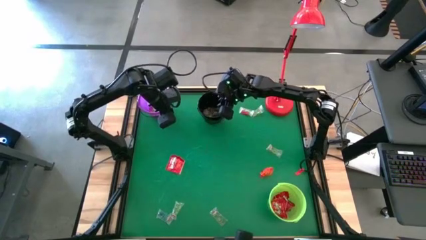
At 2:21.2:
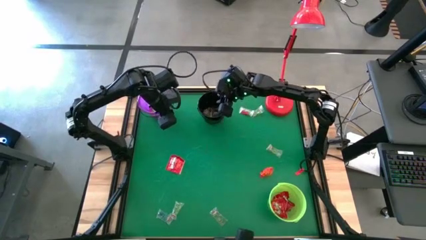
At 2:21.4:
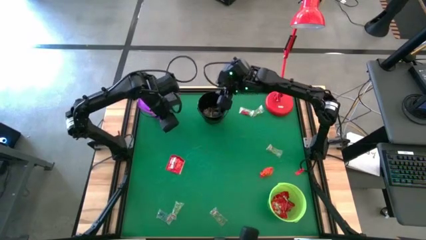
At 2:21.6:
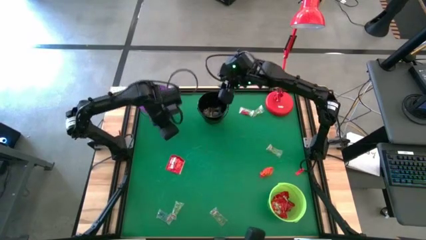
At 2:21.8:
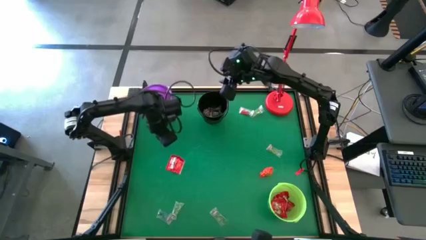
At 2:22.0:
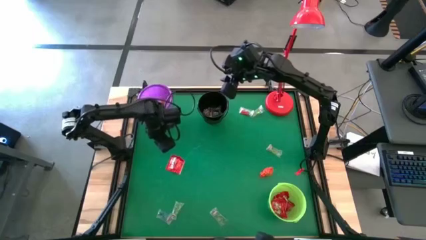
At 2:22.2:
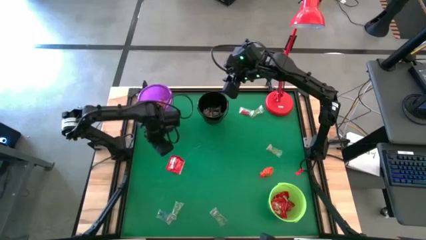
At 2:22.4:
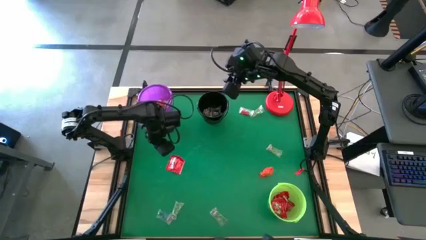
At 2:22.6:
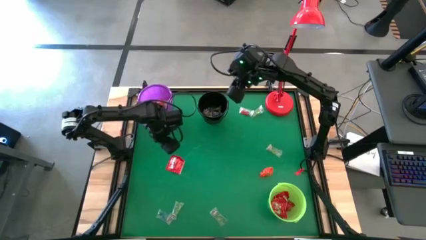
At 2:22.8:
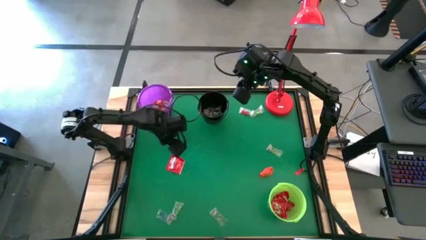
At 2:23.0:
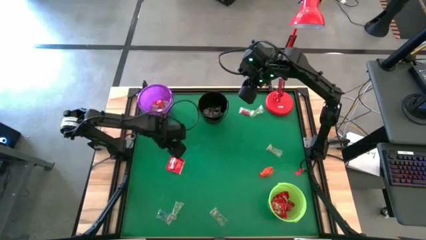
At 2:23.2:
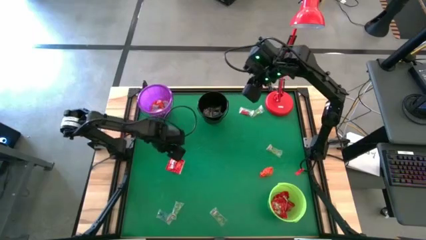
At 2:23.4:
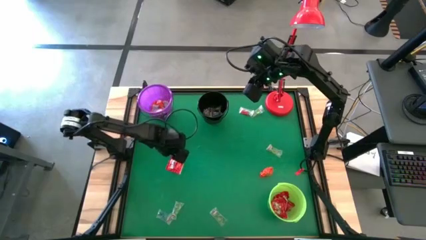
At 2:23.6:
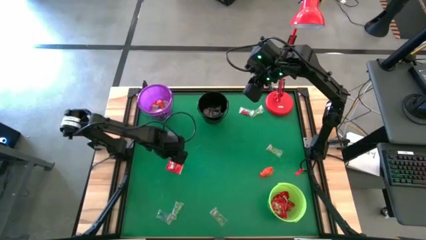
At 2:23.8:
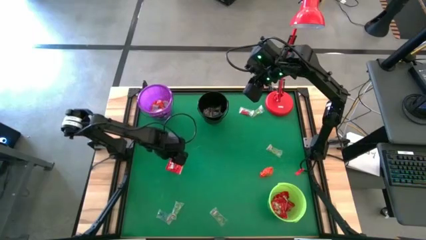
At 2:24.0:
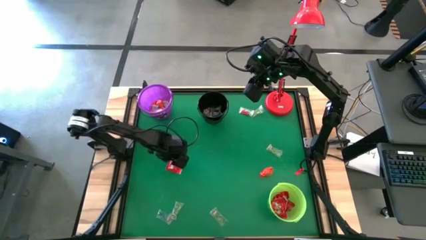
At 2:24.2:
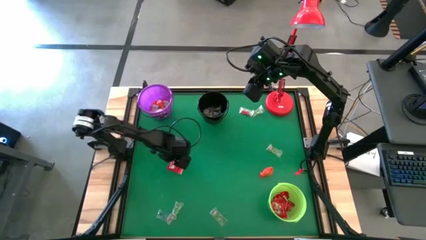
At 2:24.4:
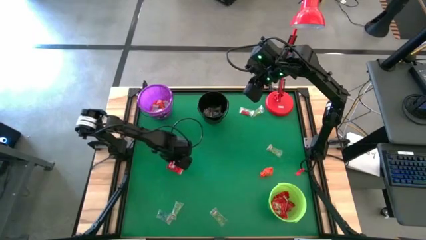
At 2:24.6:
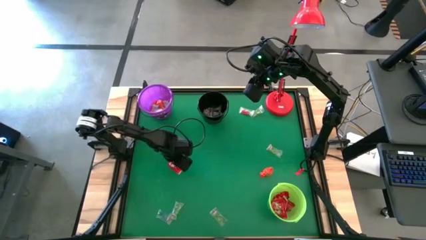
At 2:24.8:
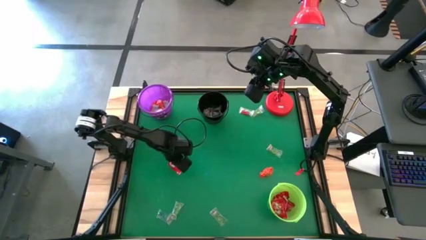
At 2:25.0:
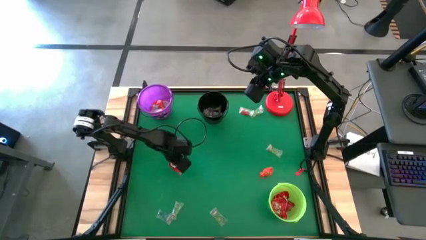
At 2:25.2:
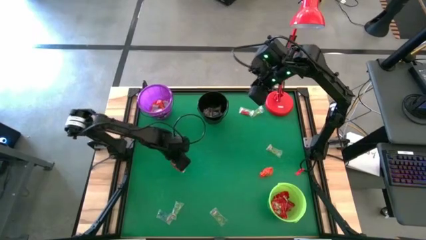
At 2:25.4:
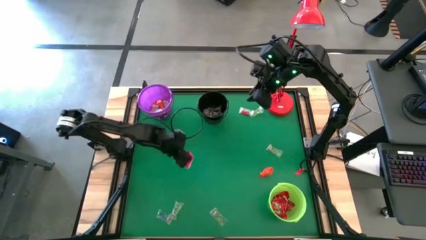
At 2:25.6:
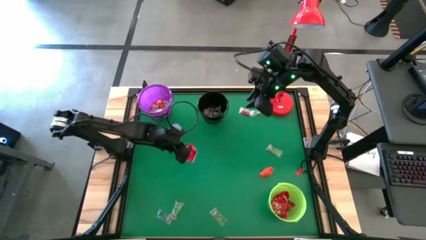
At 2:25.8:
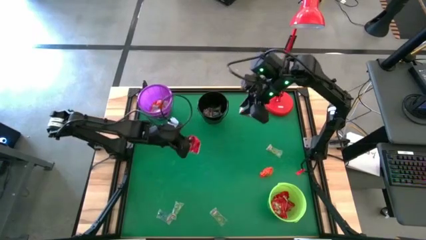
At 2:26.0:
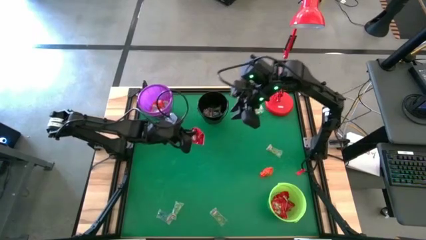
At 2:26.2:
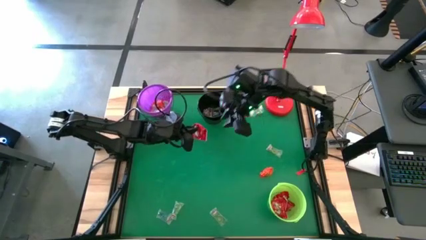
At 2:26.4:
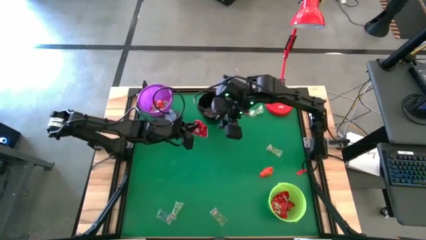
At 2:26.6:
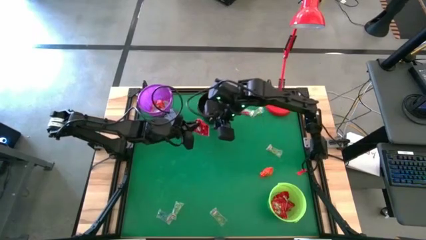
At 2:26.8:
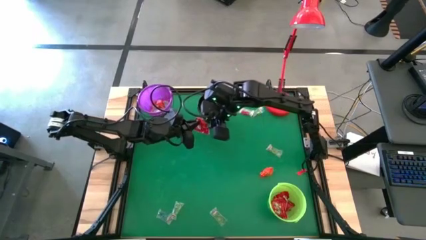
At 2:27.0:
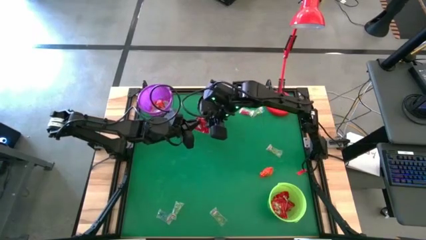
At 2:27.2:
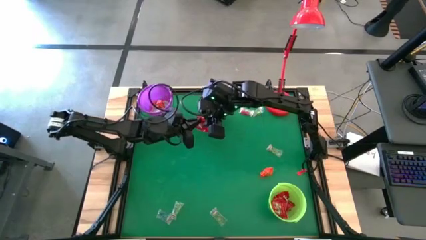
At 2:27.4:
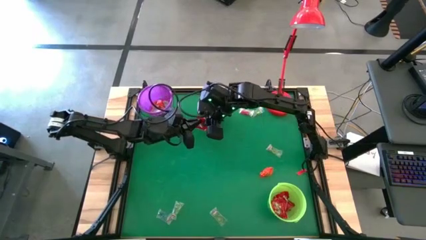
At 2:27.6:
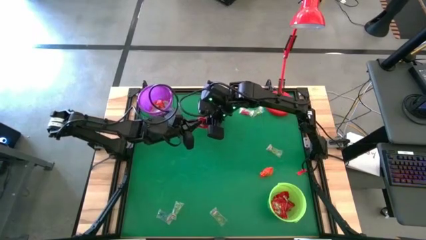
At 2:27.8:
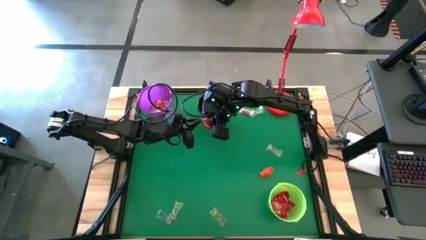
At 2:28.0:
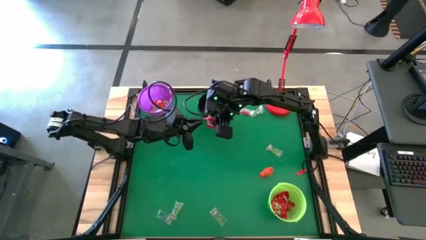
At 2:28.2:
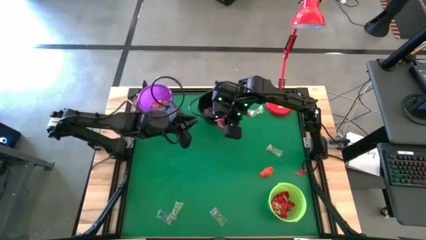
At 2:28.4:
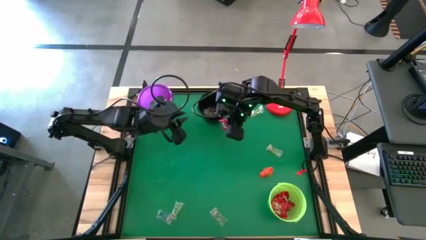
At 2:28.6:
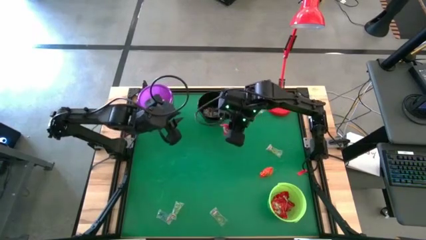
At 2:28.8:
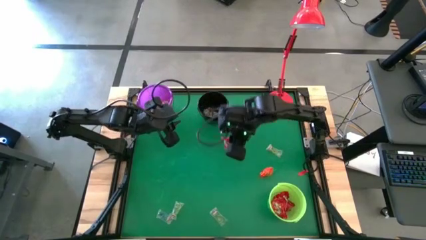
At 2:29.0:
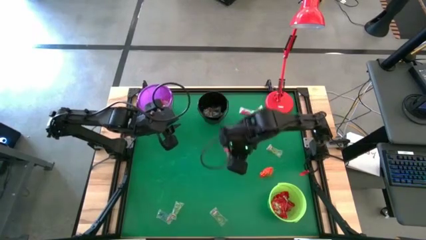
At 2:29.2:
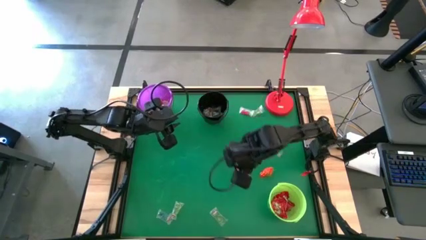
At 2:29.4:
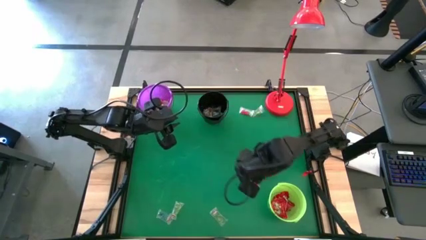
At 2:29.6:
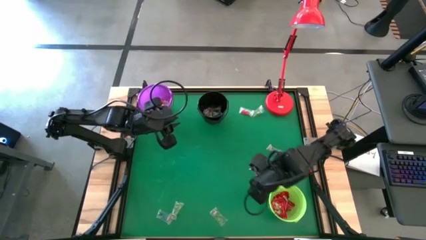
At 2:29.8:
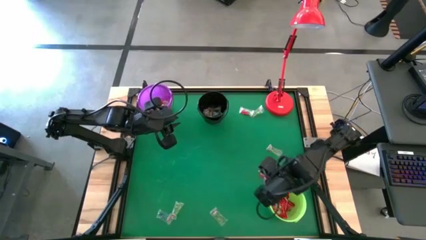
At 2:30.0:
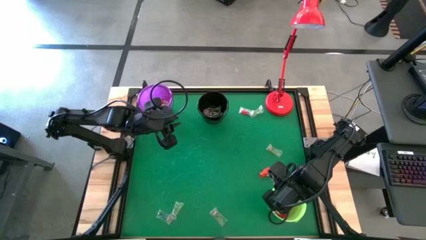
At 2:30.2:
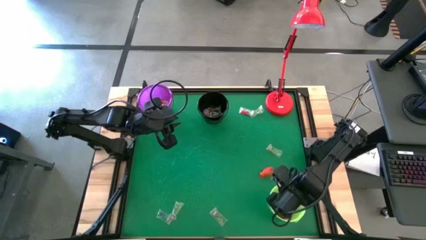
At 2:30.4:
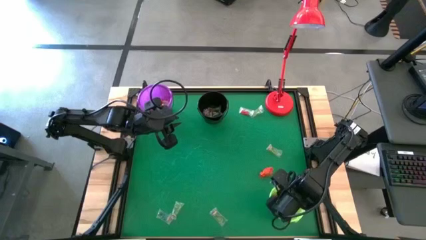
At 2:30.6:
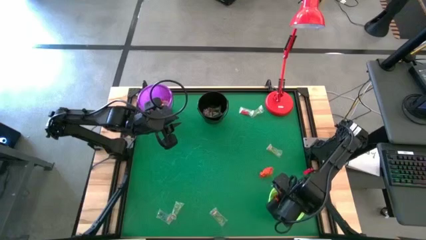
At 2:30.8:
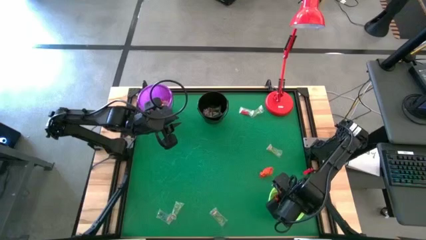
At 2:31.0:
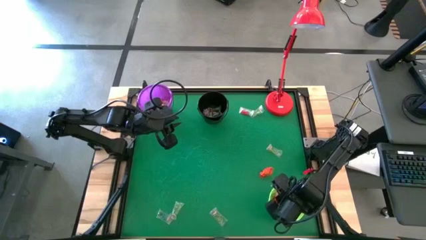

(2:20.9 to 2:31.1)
Task: Sort candy
Put the red candy into the green bucket
